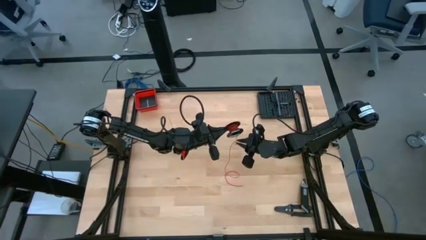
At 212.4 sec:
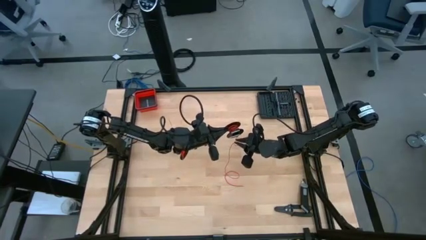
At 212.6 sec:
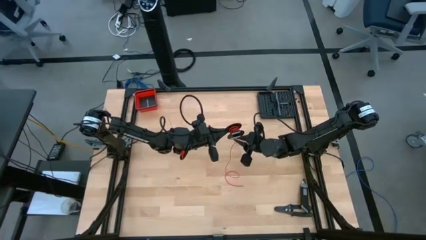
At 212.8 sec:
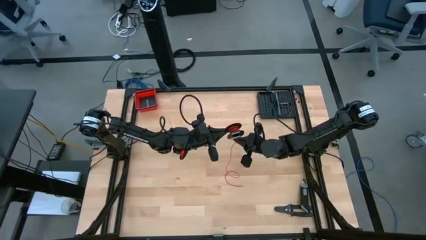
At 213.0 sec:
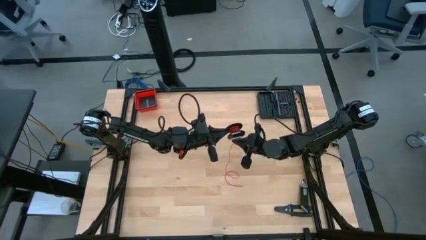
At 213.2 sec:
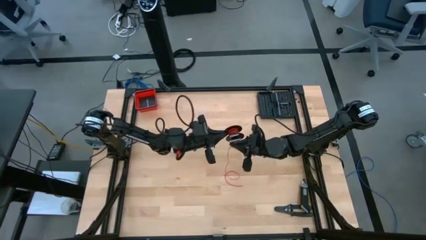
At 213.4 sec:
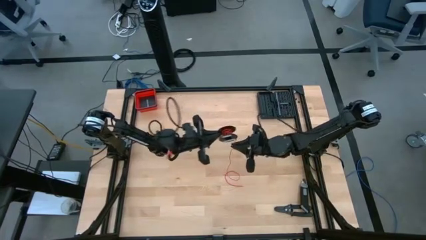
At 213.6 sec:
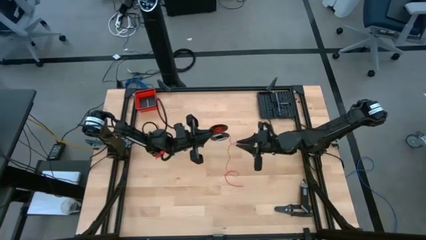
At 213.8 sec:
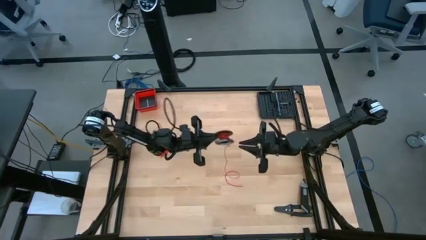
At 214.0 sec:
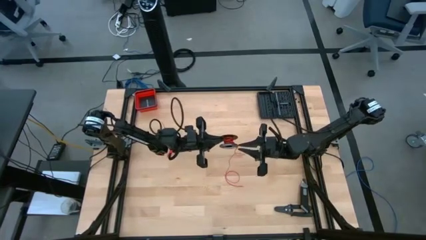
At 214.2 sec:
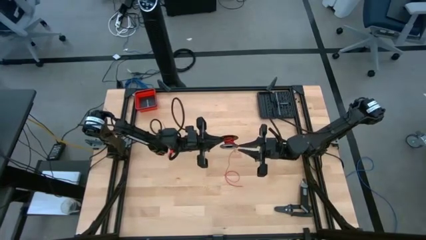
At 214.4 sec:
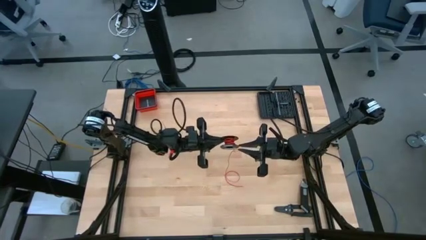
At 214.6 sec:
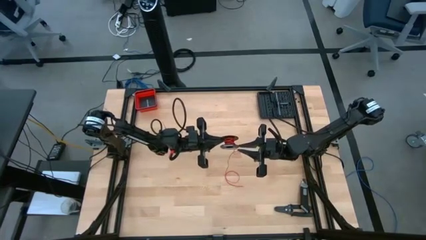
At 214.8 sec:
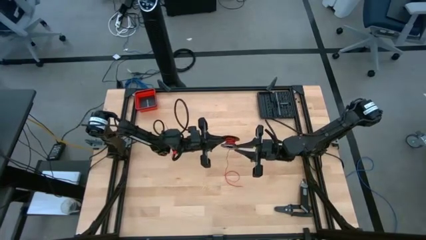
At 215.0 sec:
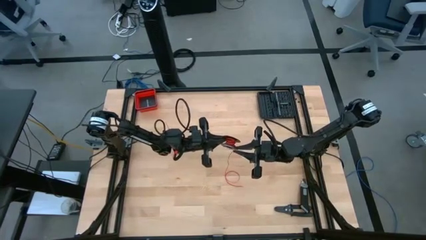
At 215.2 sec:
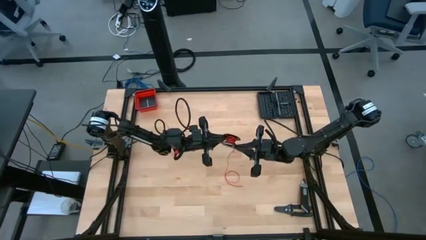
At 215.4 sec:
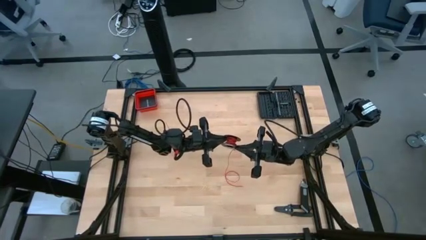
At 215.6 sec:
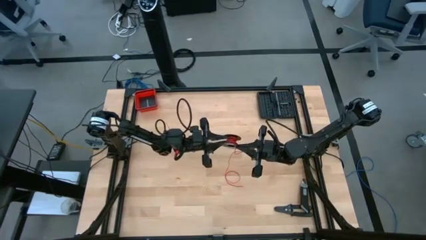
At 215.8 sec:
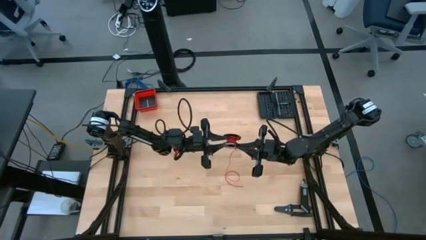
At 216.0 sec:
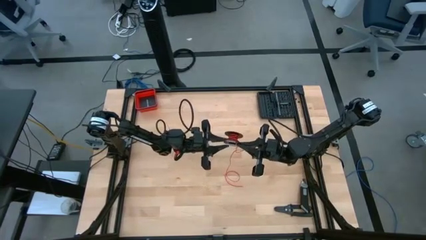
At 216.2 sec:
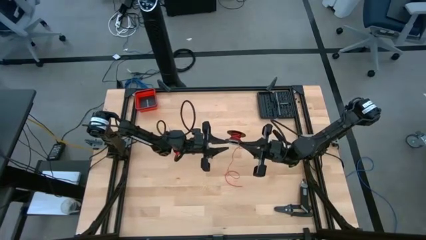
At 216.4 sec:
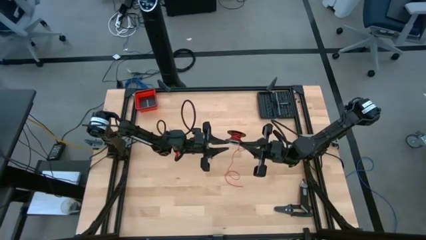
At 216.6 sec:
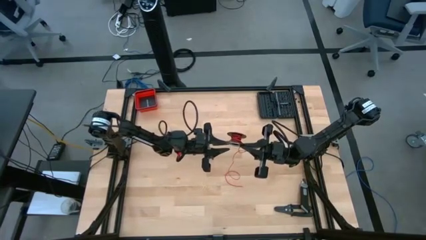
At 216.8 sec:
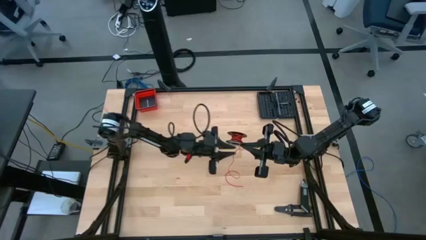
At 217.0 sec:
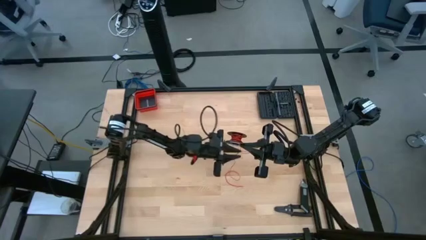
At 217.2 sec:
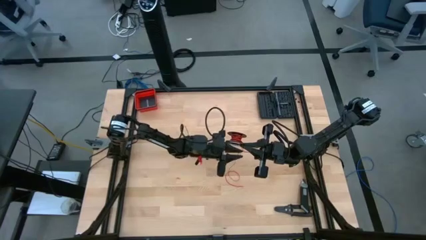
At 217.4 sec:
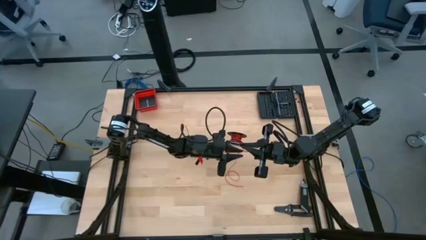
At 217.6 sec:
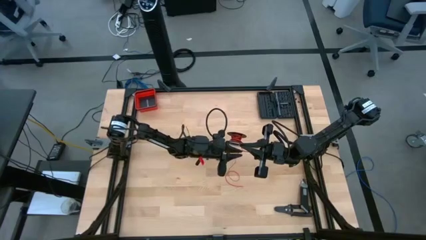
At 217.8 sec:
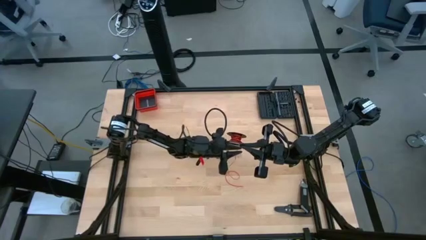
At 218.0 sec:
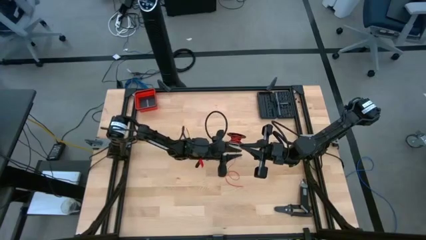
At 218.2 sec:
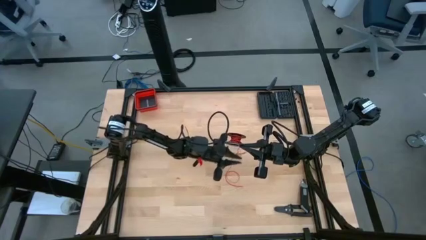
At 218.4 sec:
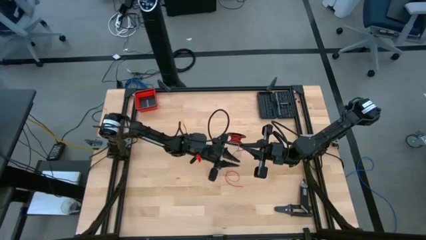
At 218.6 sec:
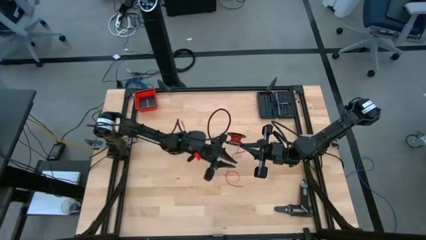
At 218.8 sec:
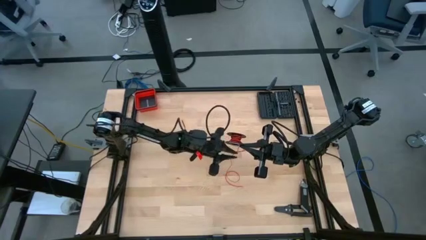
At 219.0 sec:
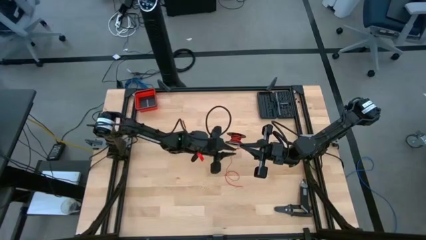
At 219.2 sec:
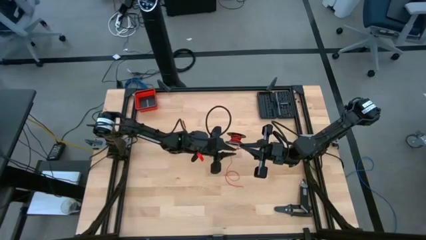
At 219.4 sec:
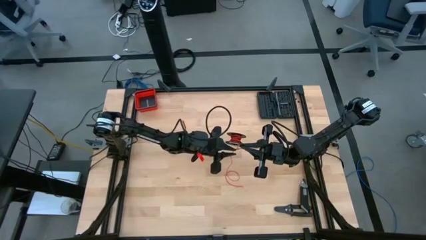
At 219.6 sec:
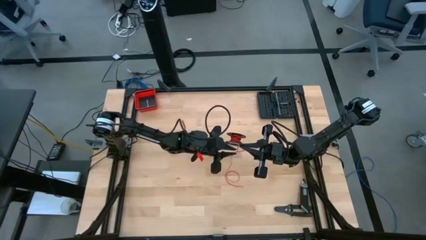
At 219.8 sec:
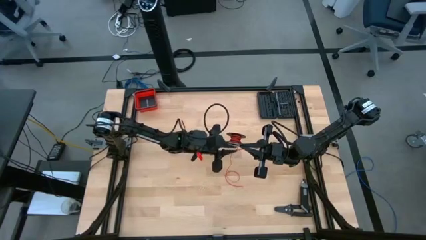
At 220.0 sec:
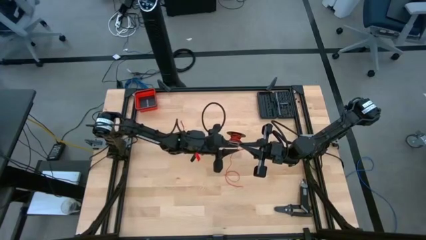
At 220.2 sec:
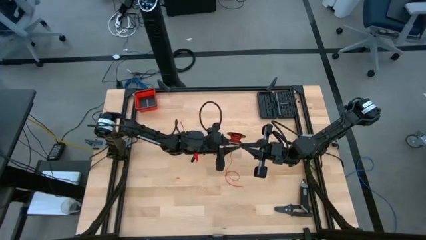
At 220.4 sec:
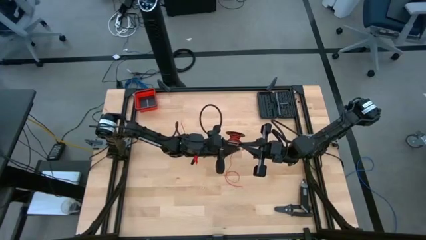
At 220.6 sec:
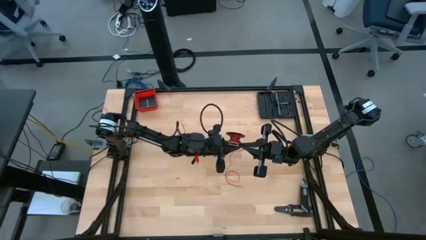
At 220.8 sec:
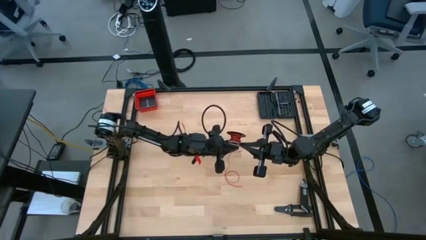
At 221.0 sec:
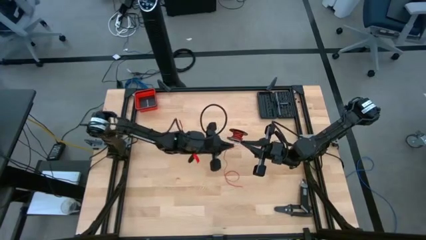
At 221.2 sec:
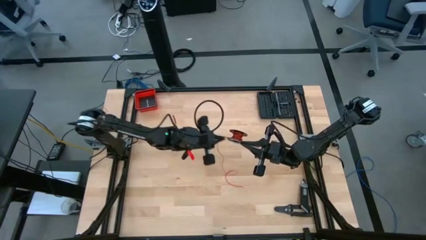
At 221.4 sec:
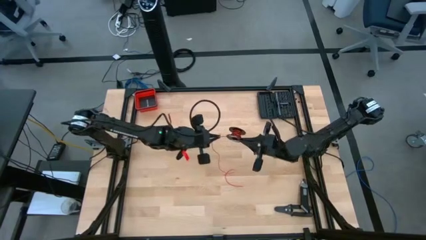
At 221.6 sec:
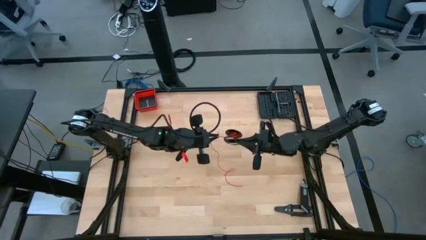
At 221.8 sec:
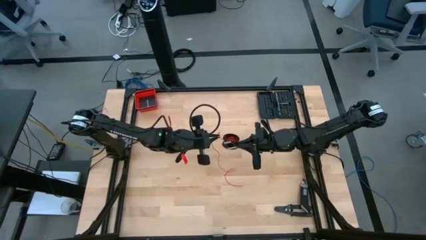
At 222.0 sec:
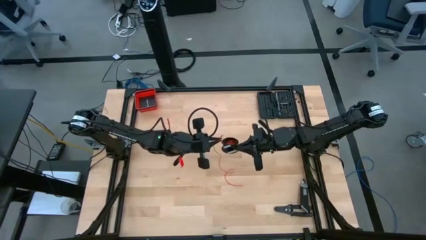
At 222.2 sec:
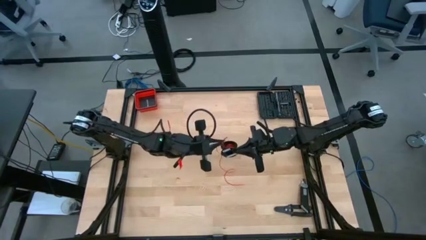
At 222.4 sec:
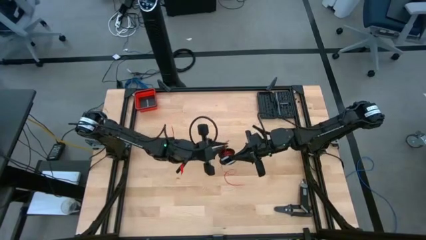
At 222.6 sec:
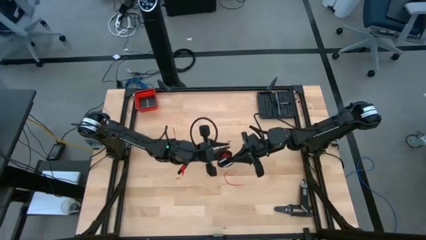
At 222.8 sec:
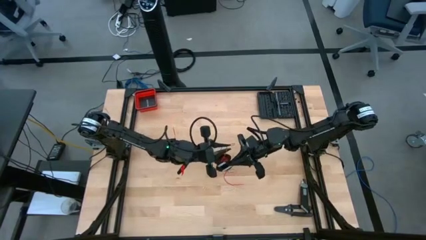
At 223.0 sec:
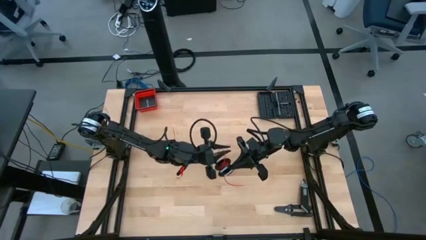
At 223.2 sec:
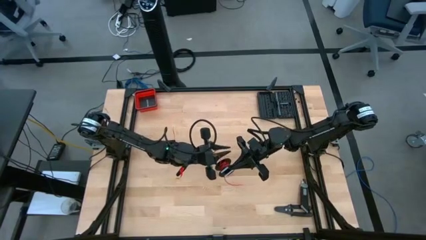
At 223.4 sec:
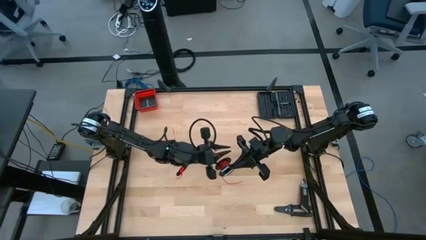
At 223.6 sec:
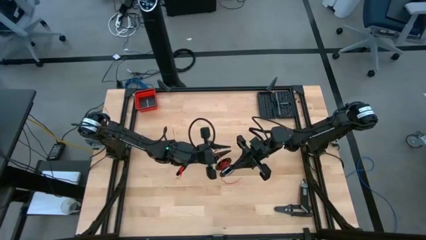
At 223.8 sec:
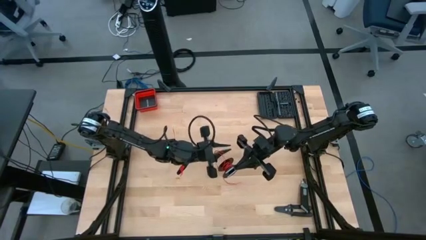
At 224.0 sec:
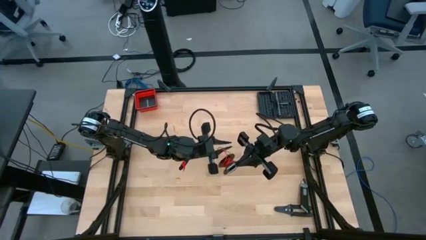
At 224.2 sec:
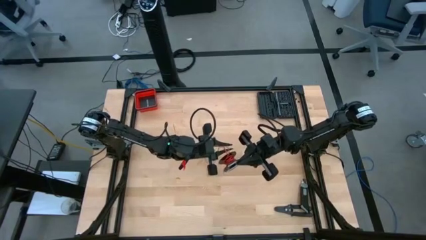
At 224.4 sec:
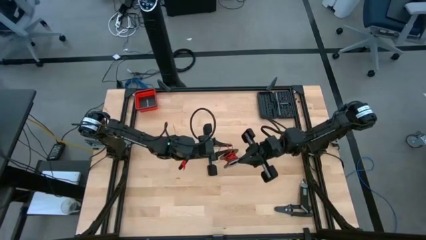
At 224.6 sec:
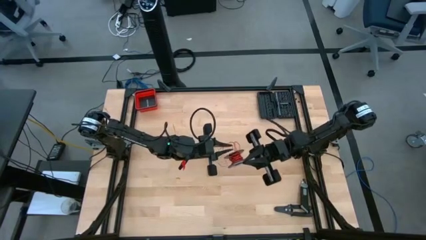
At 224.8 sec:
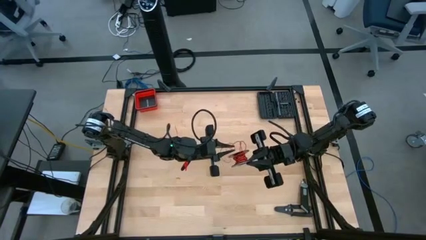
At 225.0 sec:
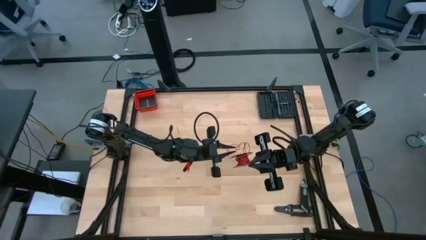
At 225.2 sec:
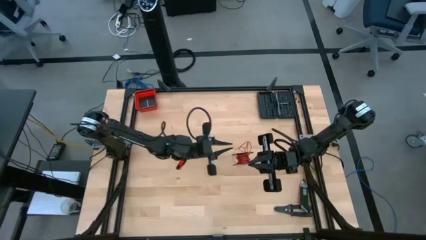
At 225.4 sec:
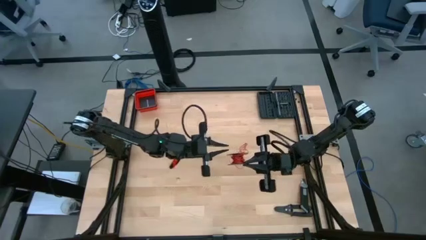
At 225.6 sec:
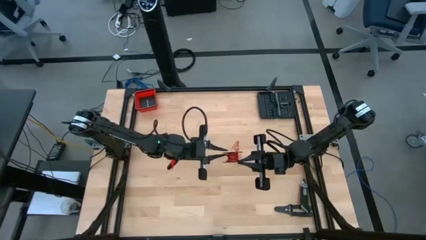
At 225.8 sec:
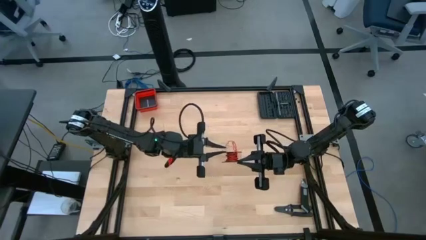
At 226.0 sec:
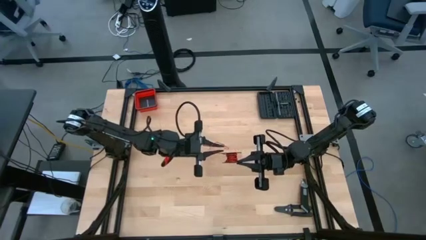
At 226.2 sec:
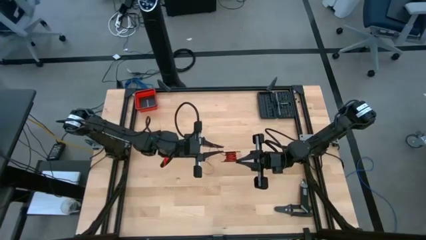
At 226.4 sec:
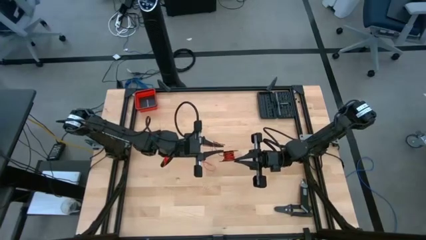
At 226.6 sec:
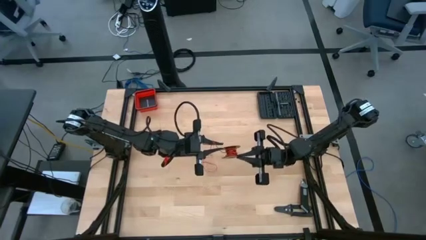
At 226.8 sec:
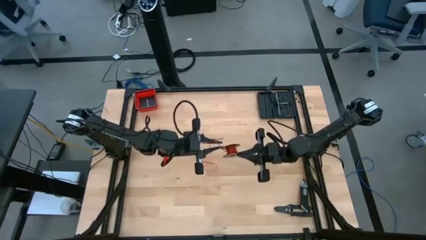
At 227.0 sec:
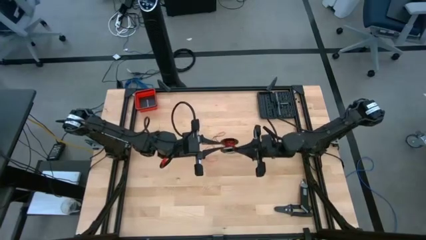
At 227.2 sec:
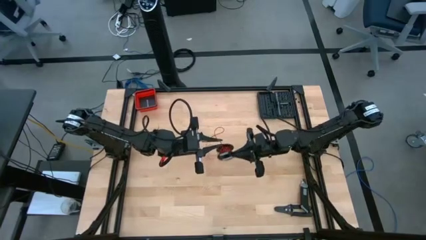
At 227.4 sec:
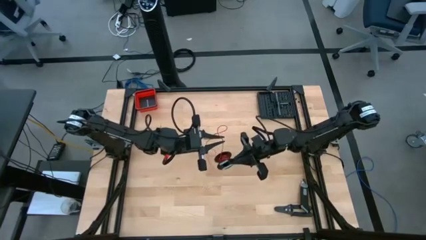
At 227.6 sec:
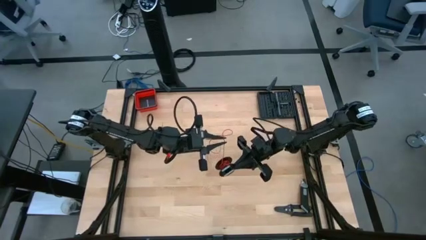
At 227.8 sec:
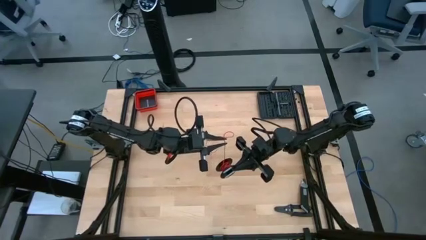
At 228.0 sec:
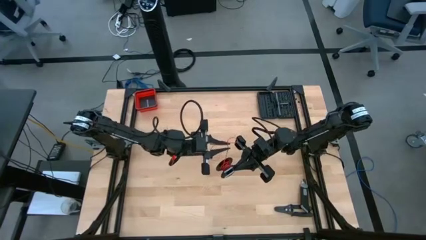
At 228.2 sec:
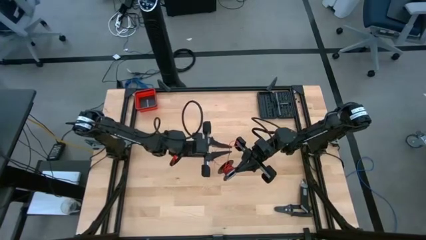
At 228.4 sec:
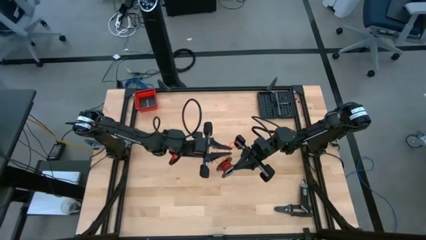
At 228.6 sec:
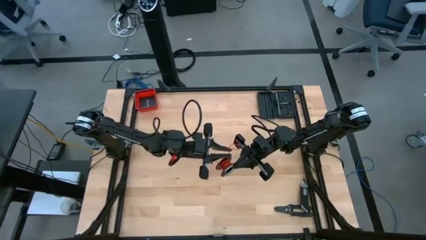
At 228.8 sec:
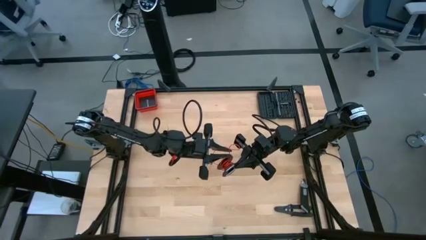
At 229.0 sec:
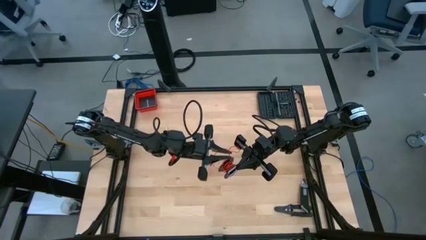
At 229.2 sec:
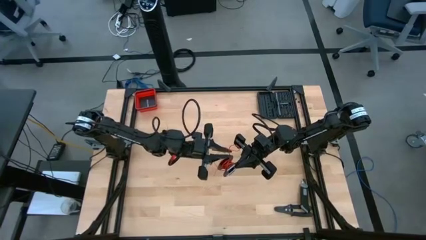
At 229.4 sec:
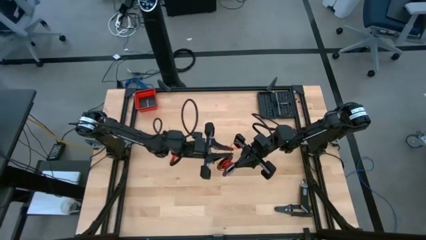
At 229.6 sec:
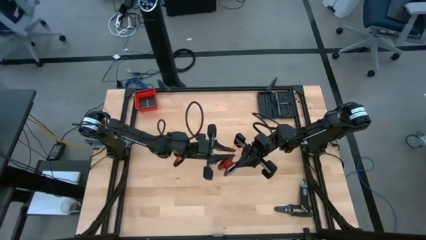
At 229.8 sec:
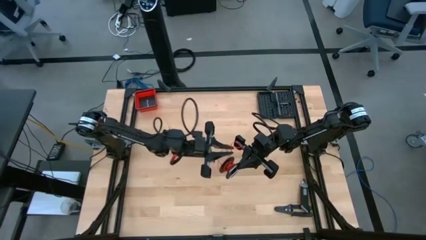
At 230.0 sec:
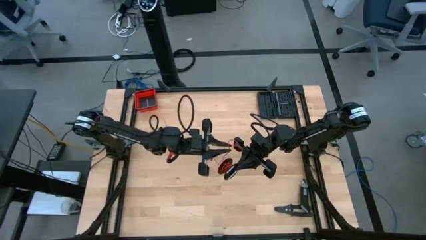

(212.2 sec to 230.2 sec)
Task: Coil cords
Coil the red wire onto the spool
